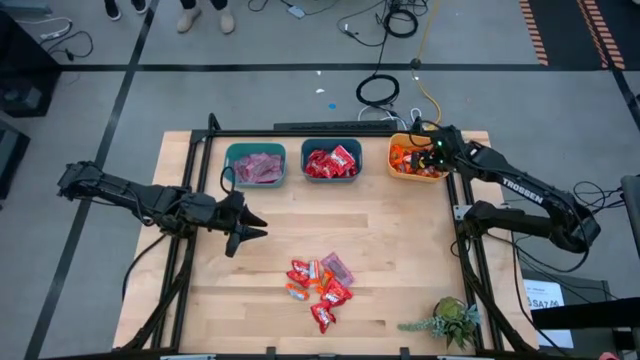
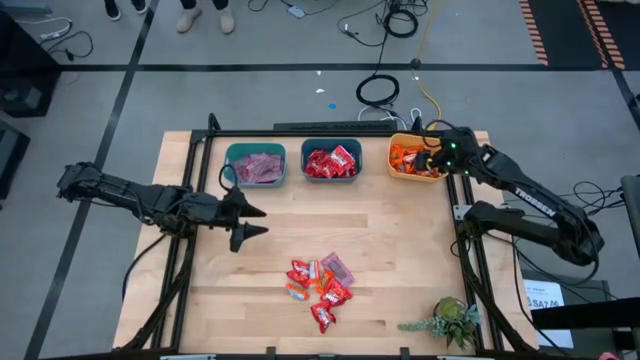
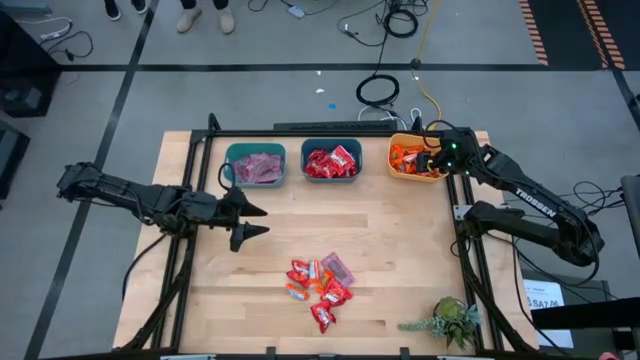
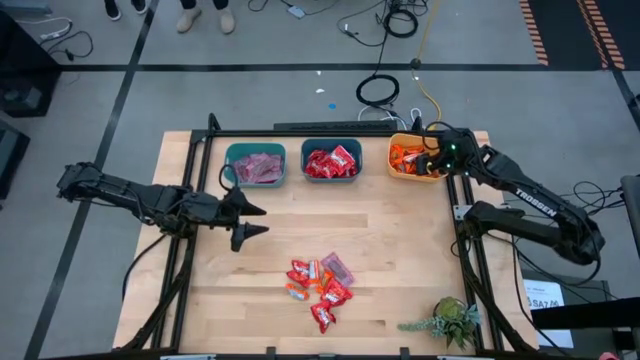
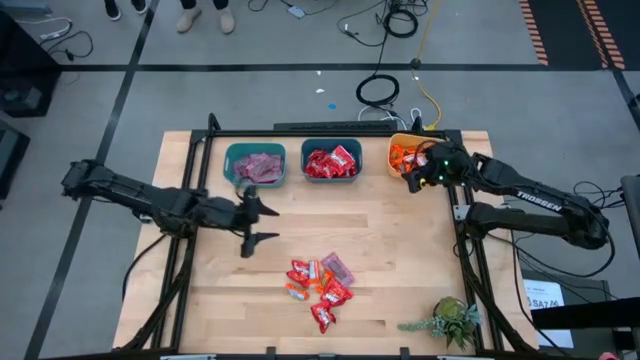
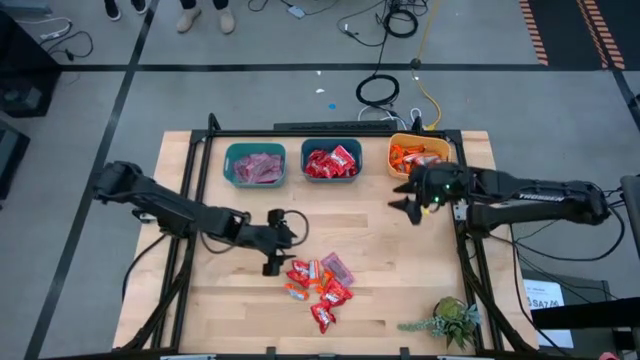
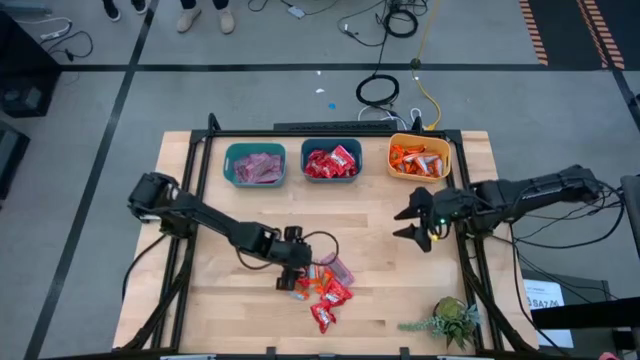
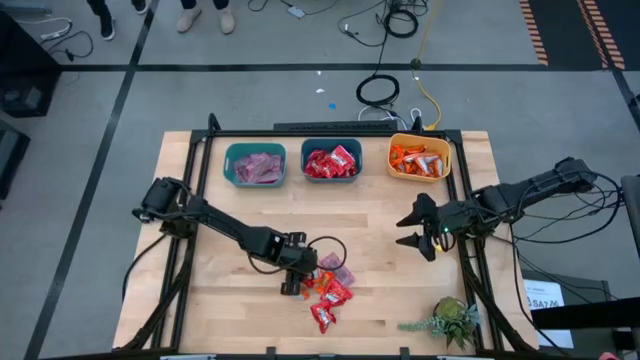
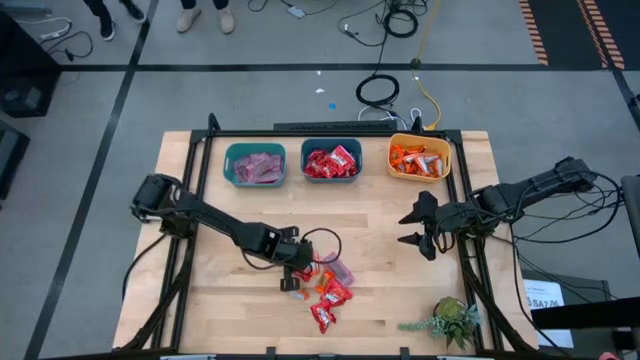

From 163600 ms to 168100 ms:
Task: Sort candy
Put the red candy into the blue bin

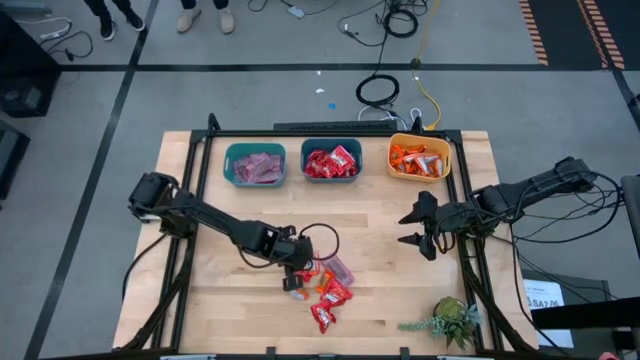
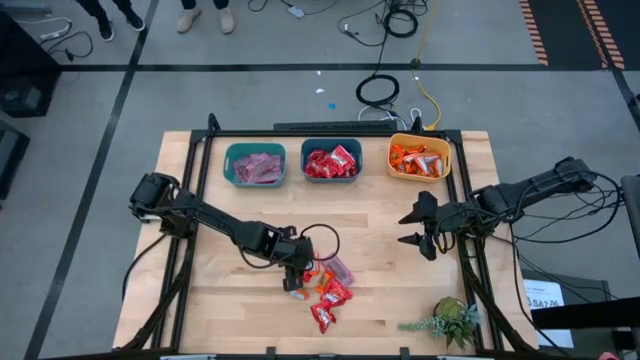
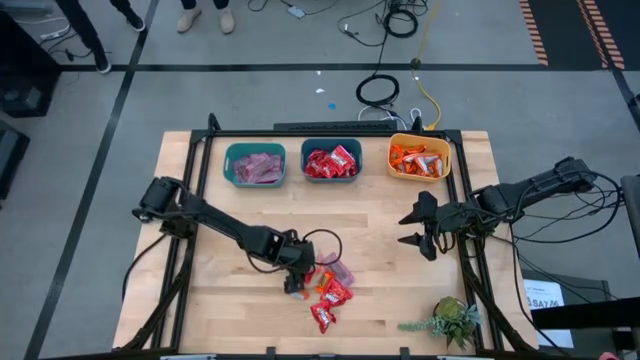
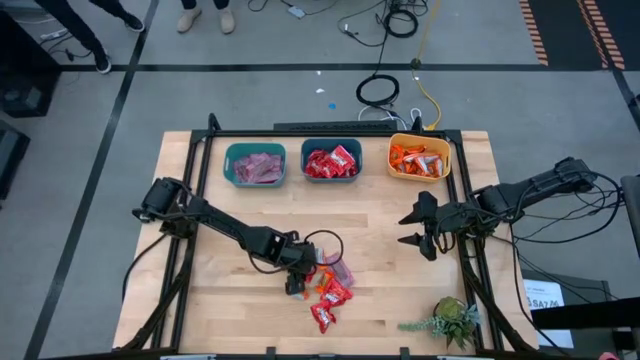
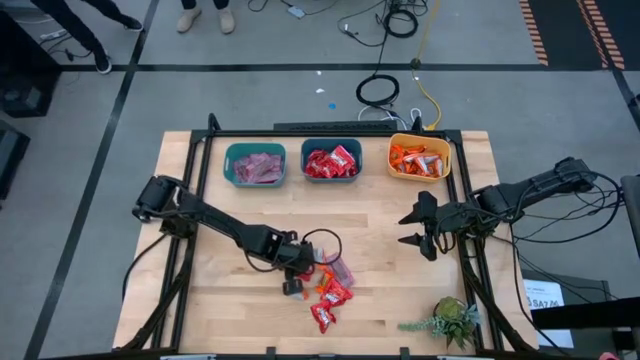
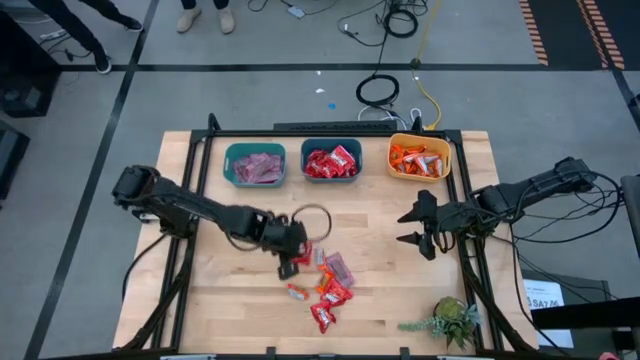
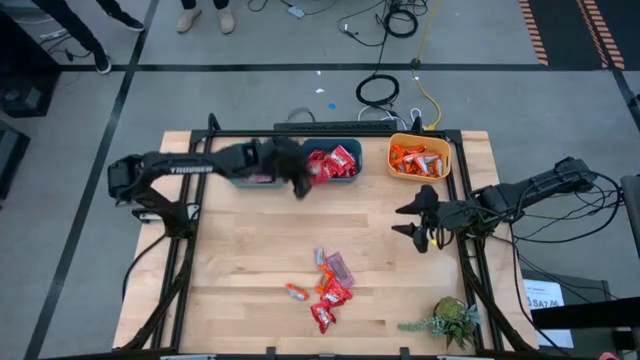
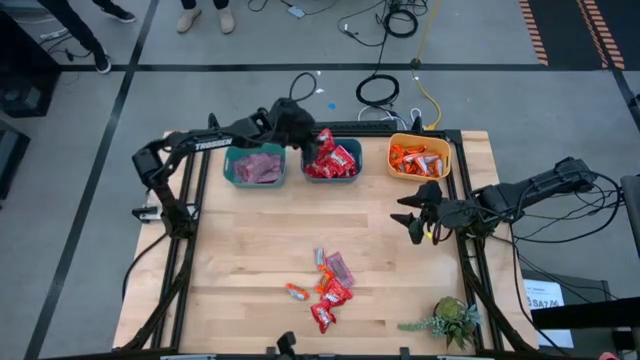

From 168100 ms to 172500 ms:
Put the red candy into the blue bin

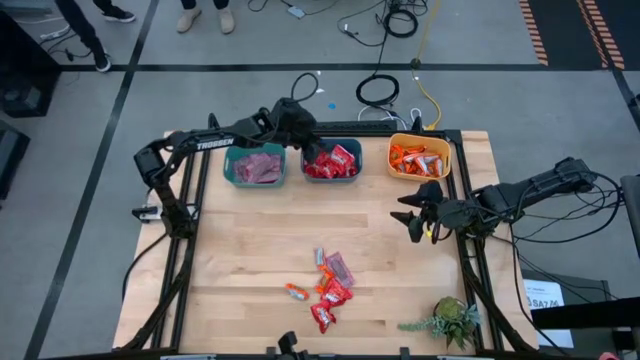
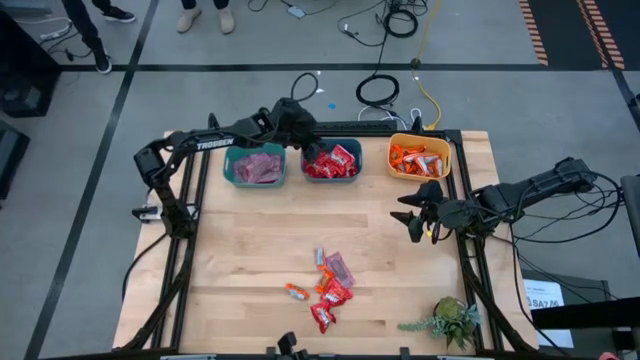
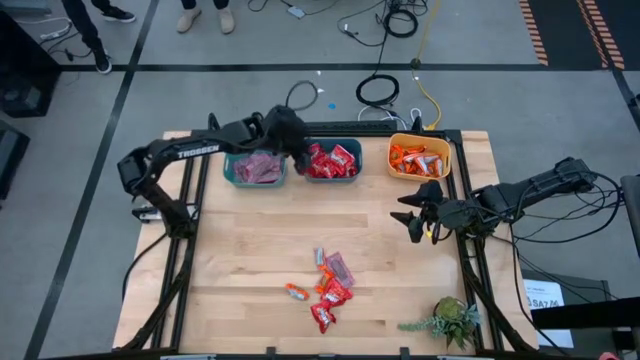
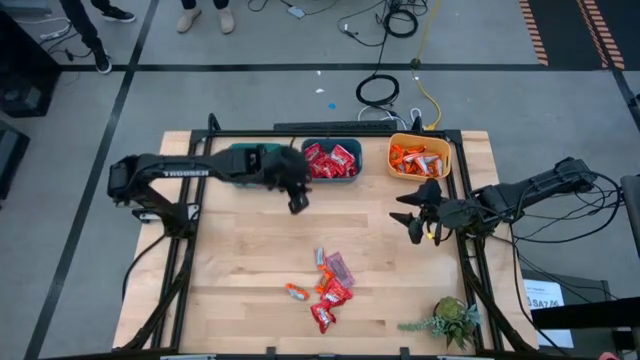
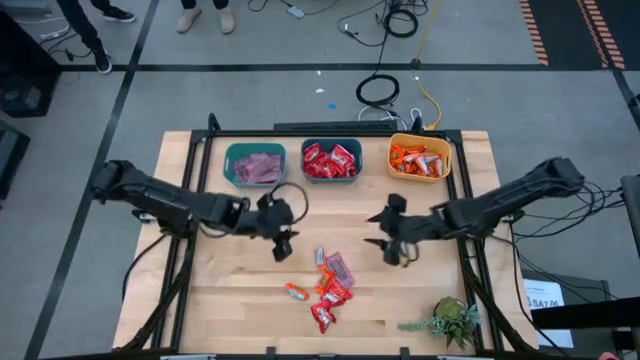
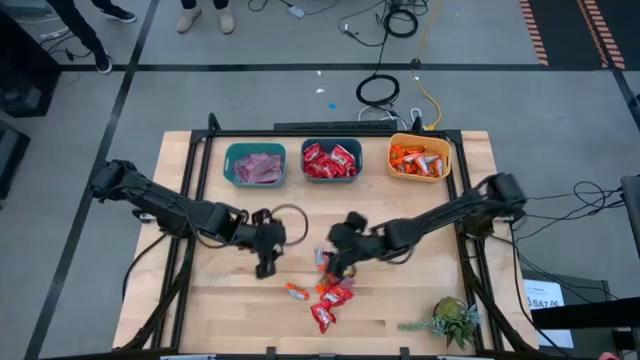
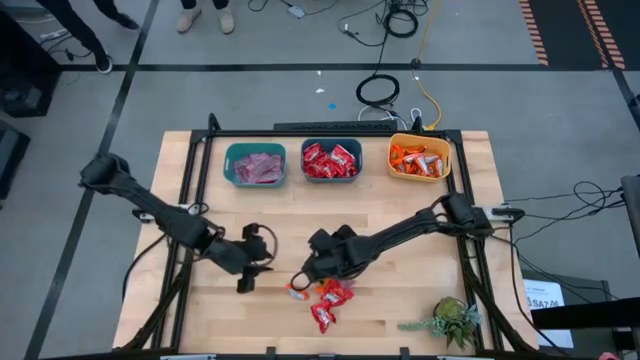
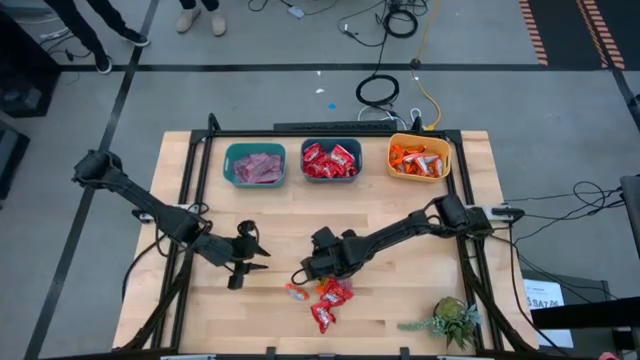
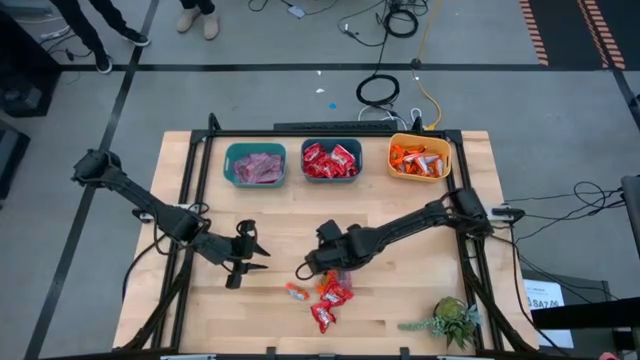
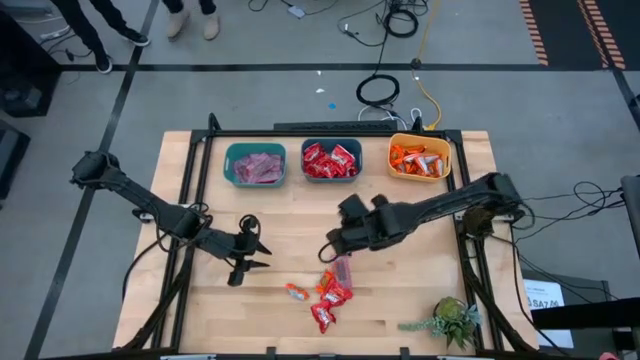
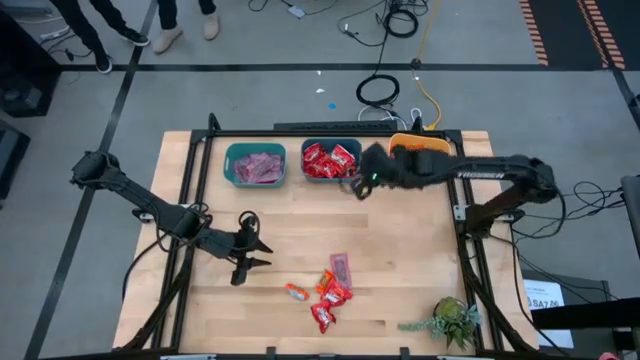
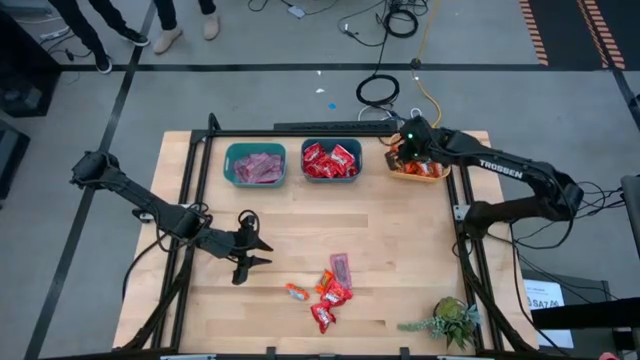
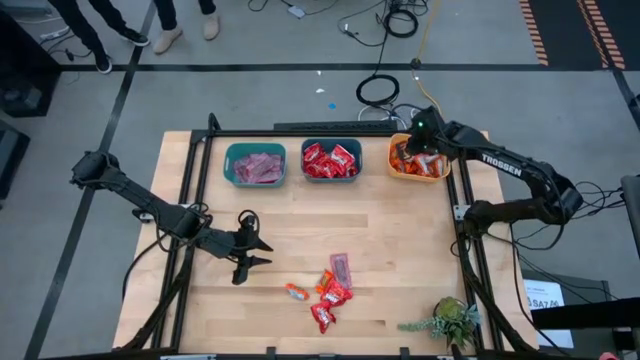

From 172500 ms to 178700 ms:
Put the orange chocolate into the yellow bin

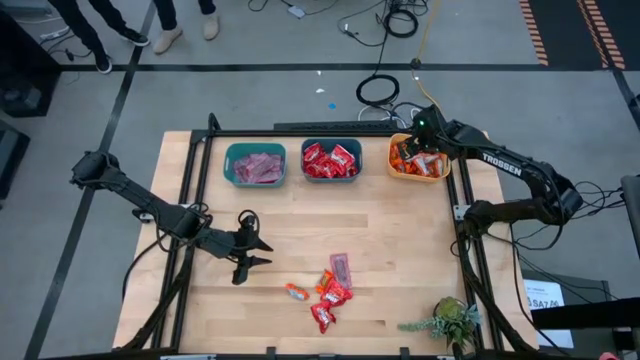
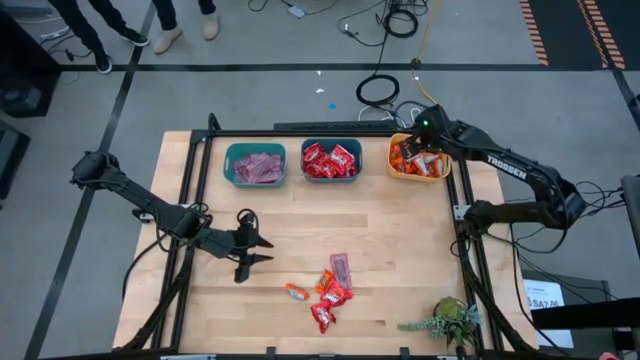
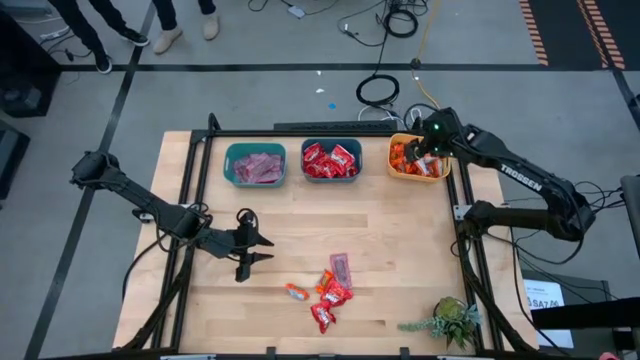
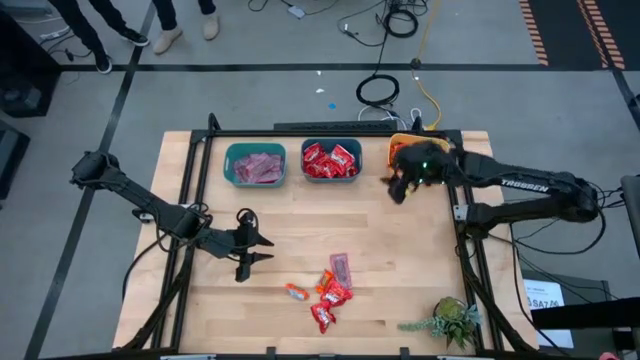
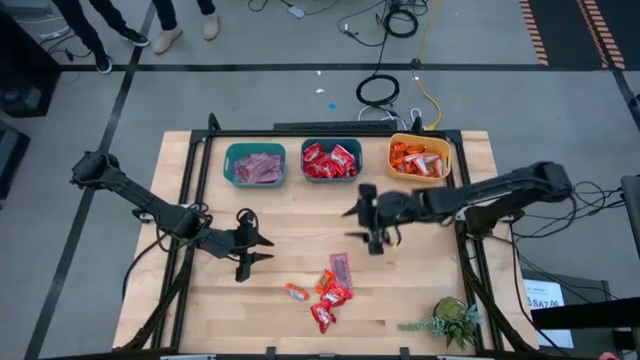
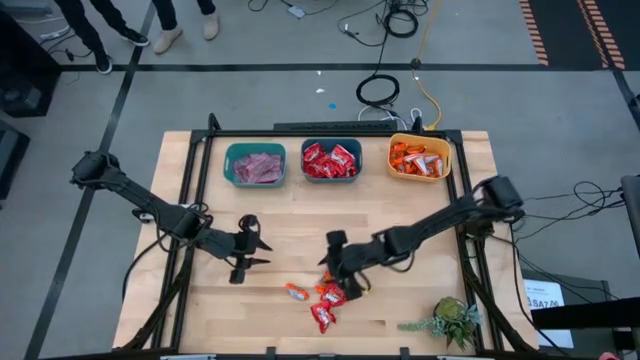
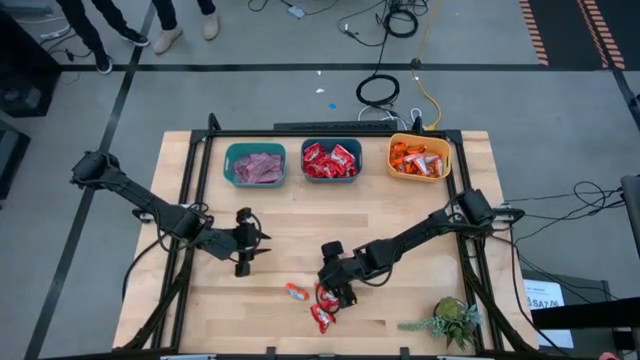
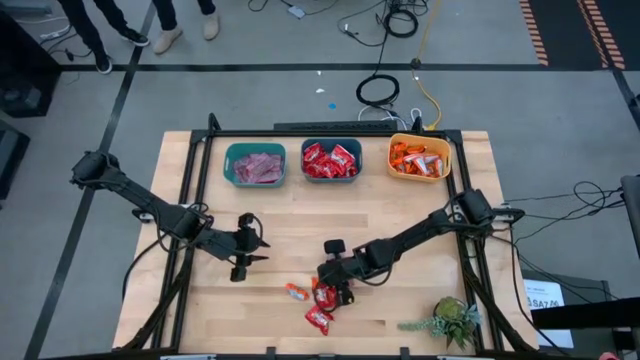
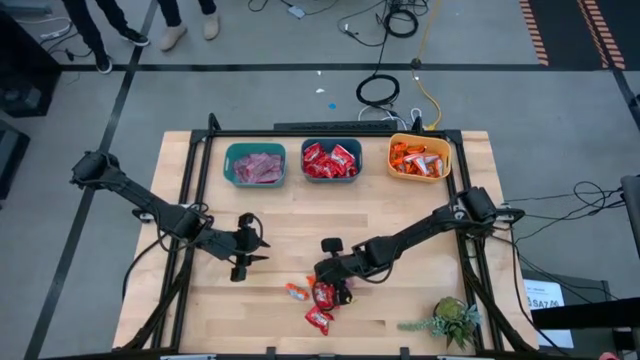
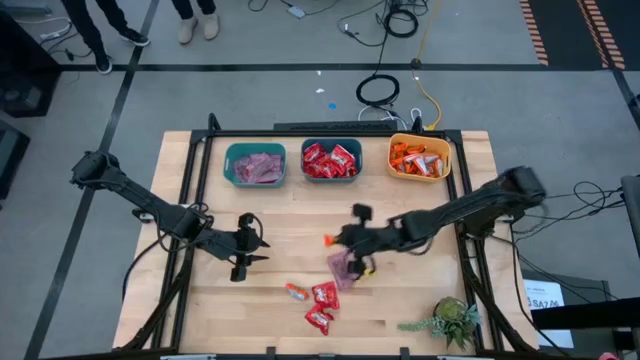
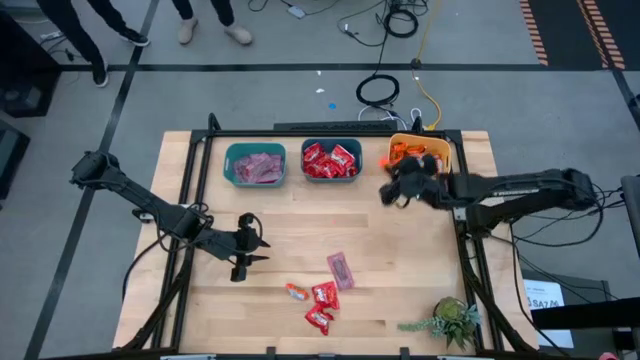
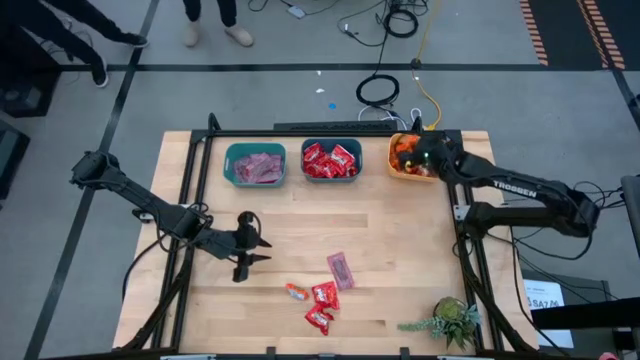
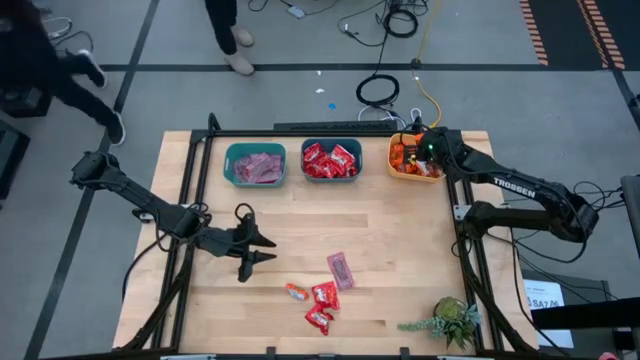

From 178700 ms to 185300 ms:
Put the orange chocolate into the yellow bin
